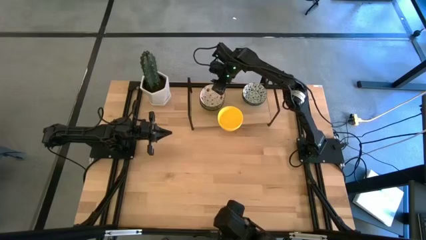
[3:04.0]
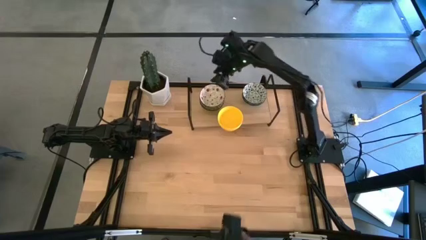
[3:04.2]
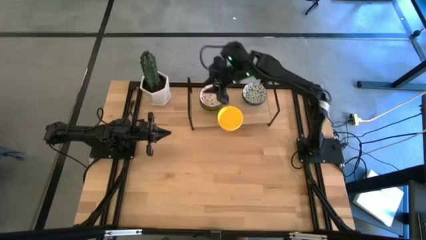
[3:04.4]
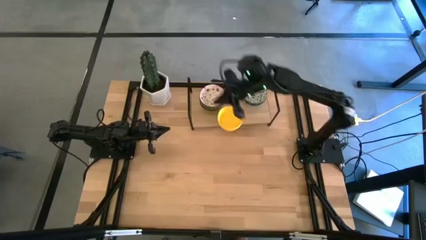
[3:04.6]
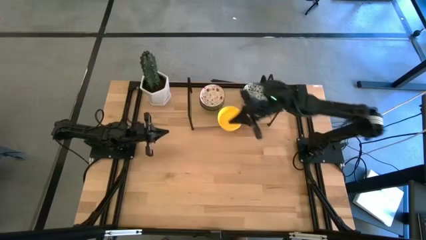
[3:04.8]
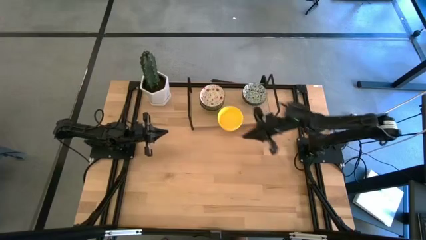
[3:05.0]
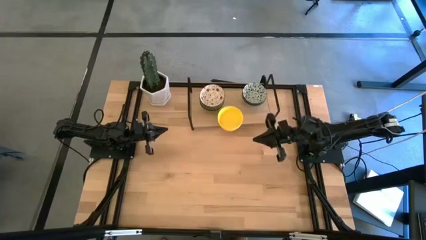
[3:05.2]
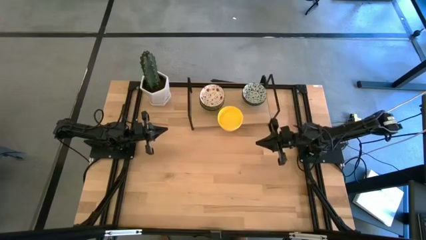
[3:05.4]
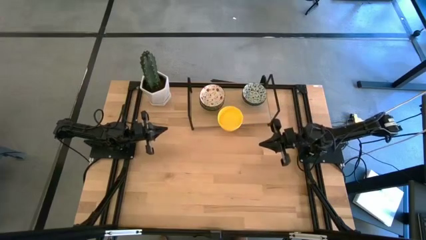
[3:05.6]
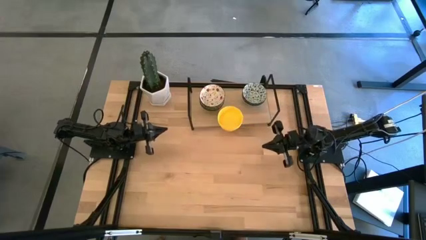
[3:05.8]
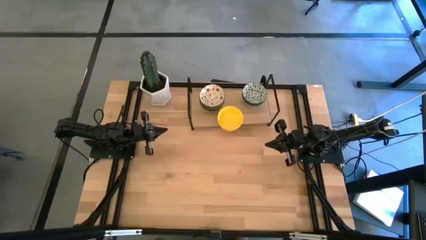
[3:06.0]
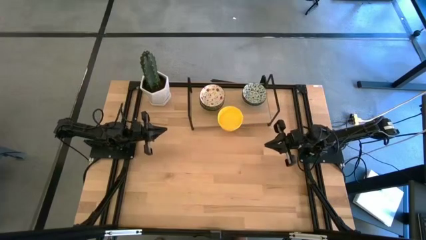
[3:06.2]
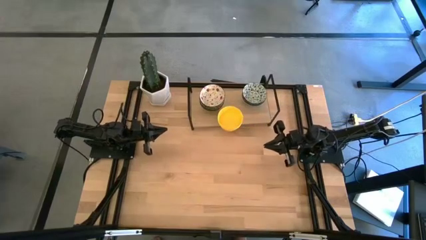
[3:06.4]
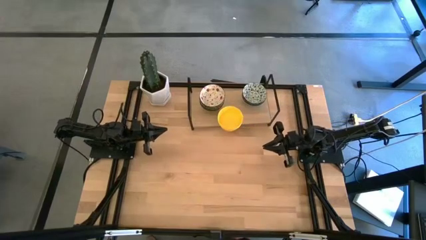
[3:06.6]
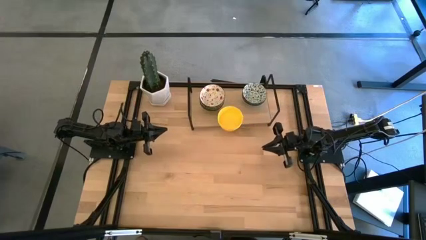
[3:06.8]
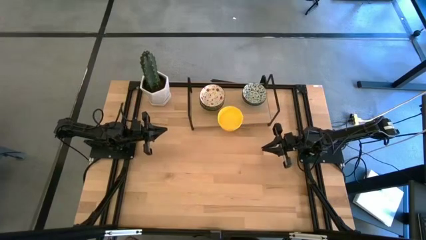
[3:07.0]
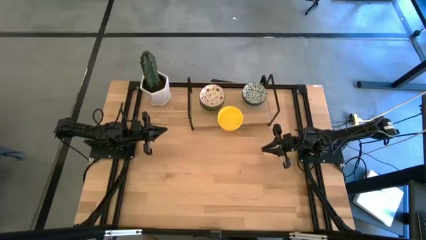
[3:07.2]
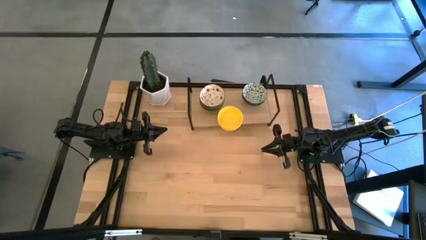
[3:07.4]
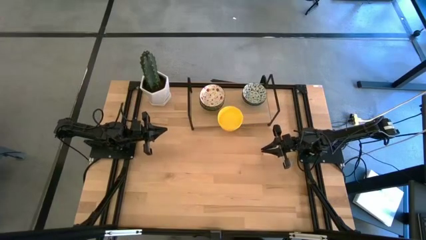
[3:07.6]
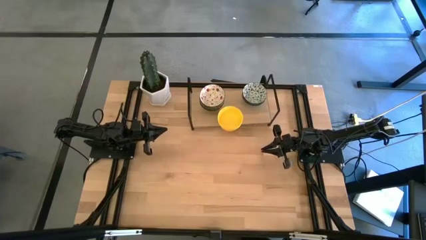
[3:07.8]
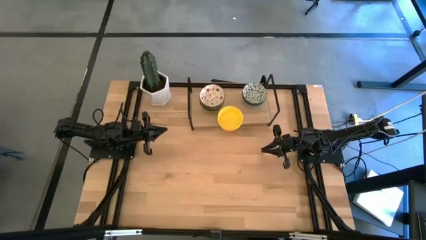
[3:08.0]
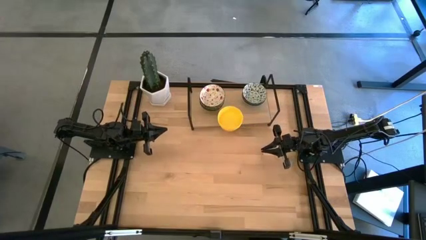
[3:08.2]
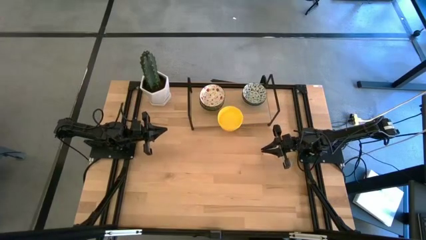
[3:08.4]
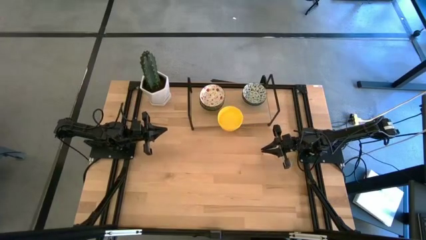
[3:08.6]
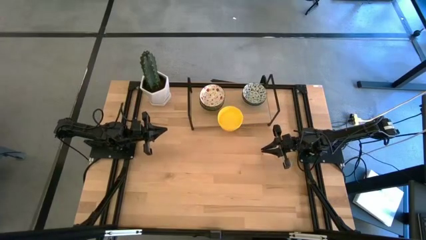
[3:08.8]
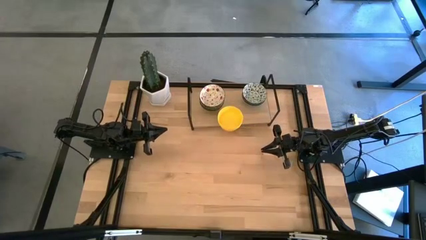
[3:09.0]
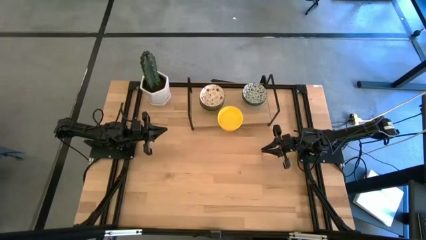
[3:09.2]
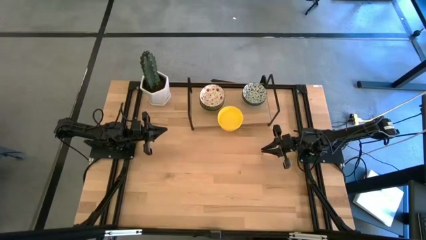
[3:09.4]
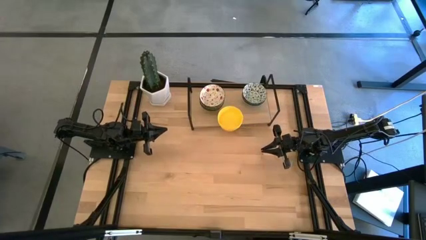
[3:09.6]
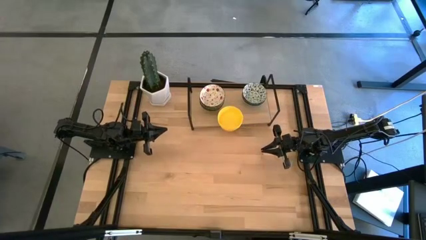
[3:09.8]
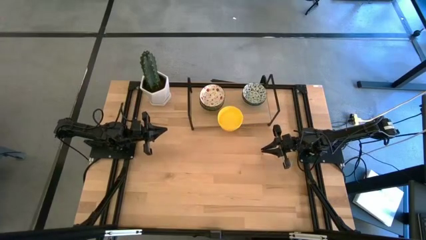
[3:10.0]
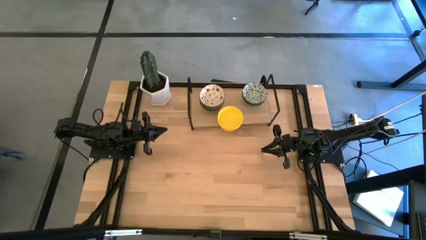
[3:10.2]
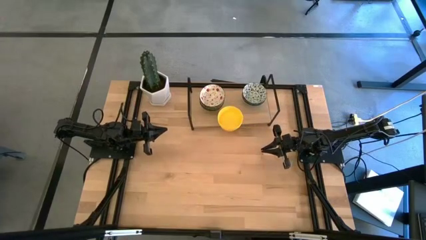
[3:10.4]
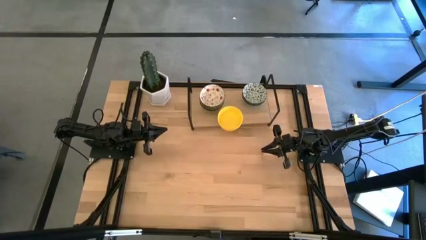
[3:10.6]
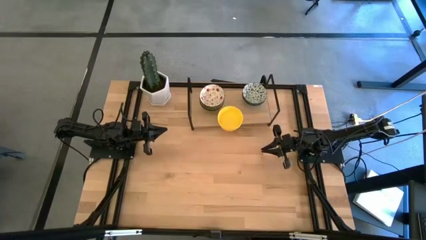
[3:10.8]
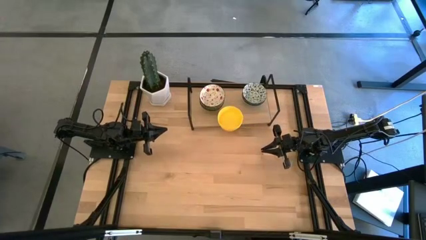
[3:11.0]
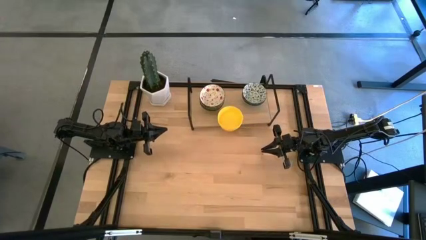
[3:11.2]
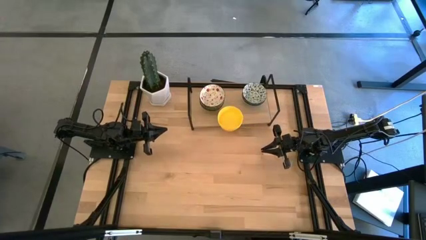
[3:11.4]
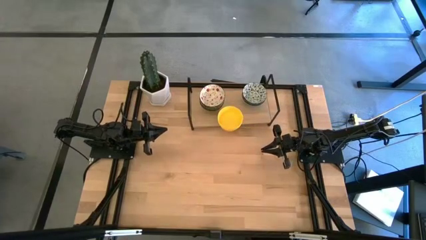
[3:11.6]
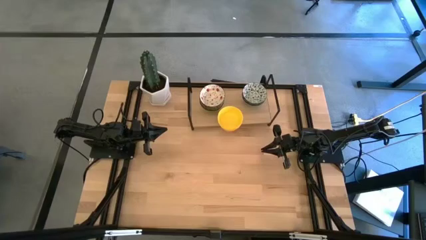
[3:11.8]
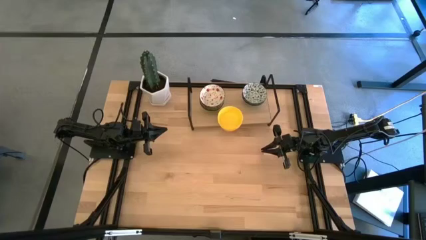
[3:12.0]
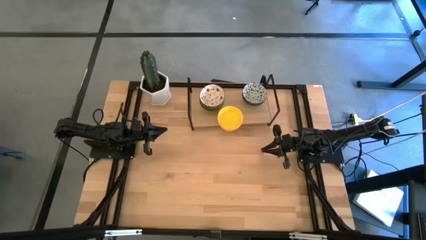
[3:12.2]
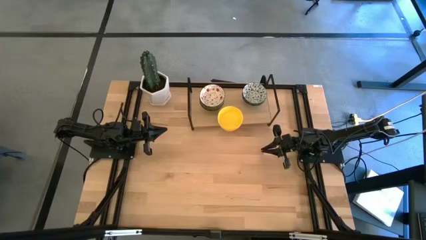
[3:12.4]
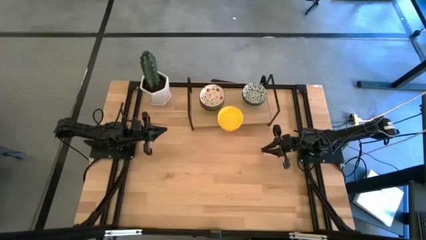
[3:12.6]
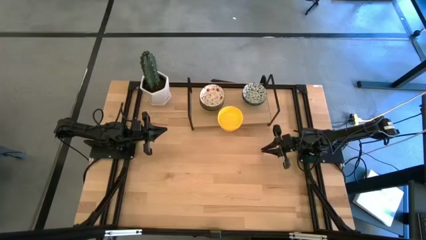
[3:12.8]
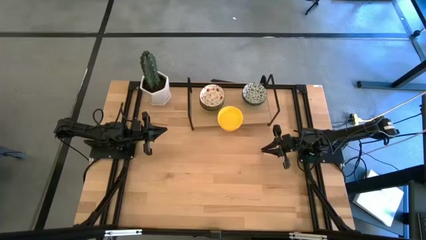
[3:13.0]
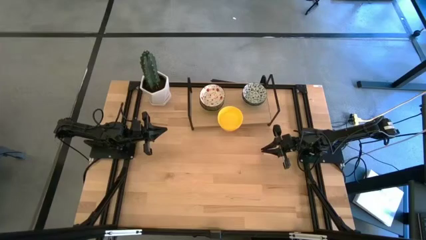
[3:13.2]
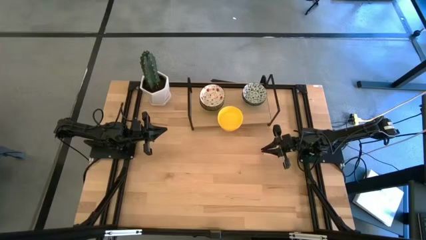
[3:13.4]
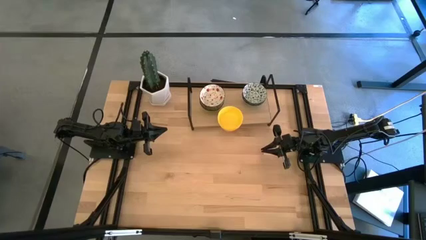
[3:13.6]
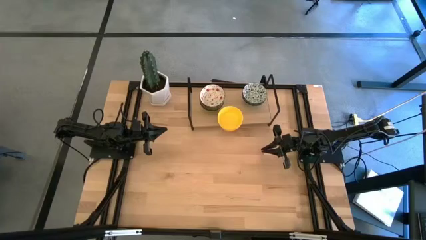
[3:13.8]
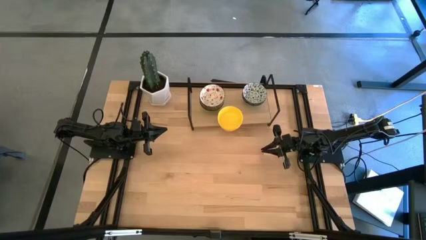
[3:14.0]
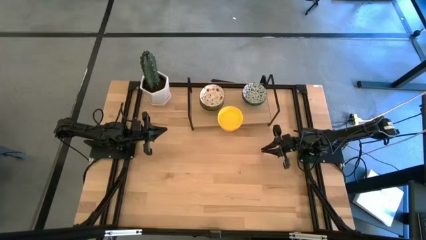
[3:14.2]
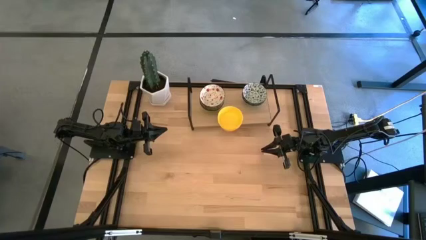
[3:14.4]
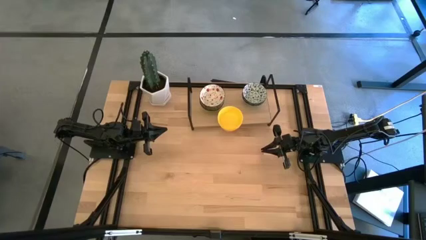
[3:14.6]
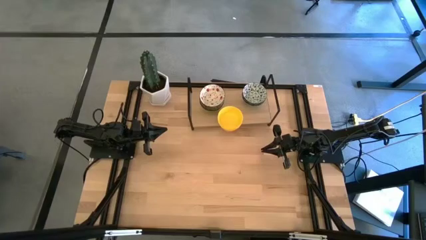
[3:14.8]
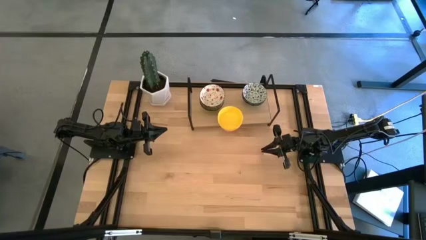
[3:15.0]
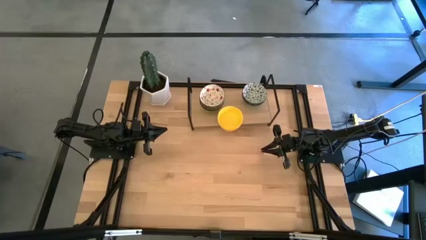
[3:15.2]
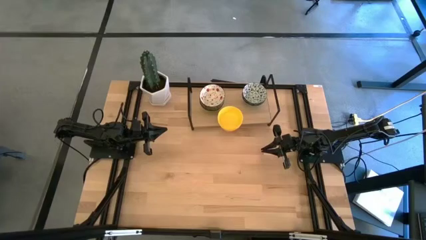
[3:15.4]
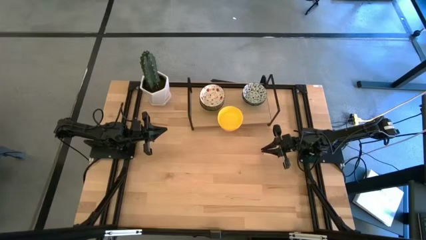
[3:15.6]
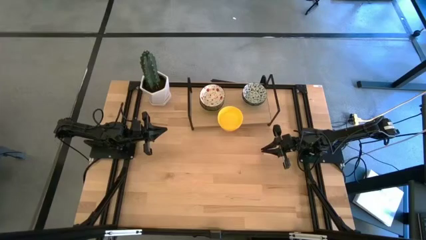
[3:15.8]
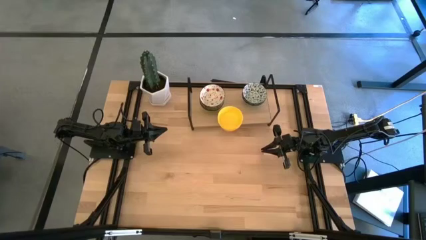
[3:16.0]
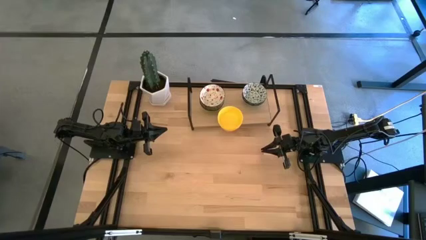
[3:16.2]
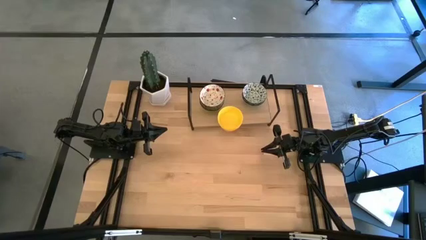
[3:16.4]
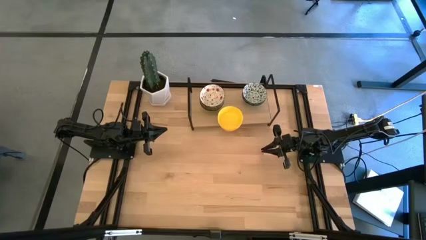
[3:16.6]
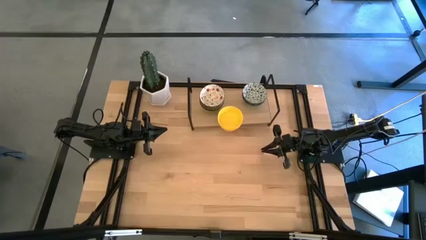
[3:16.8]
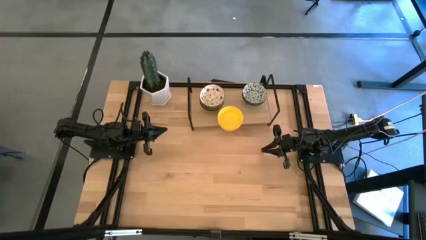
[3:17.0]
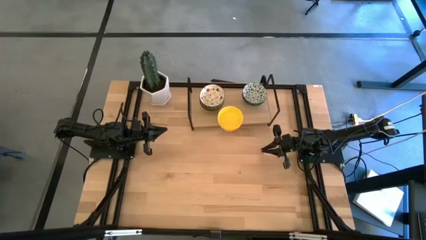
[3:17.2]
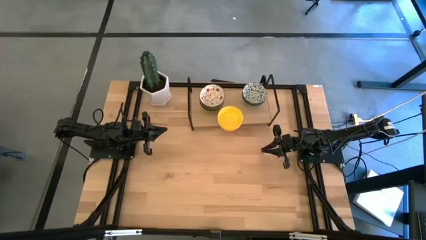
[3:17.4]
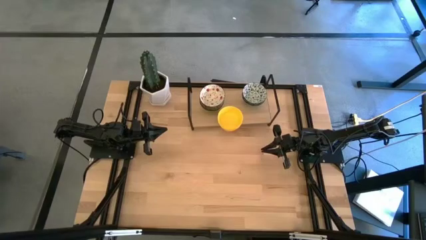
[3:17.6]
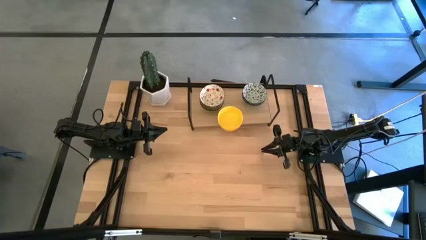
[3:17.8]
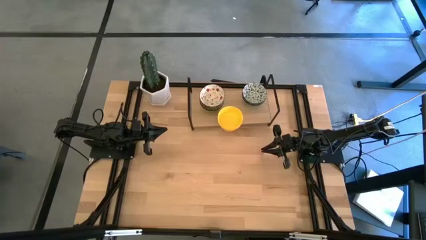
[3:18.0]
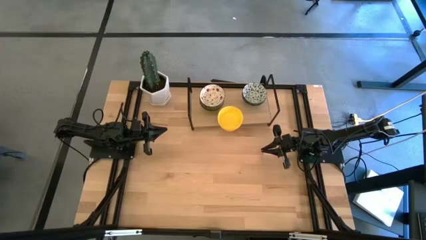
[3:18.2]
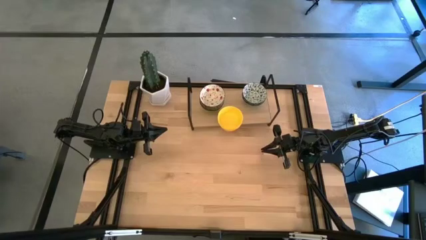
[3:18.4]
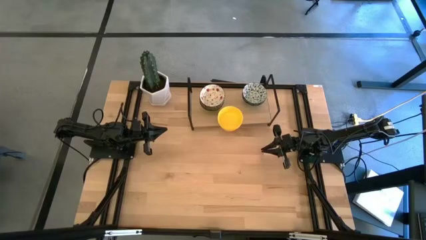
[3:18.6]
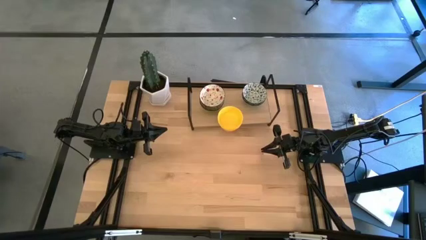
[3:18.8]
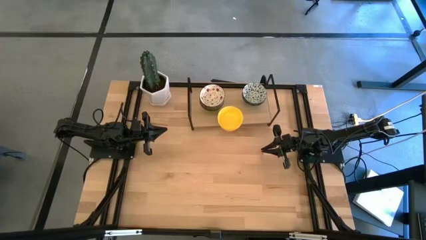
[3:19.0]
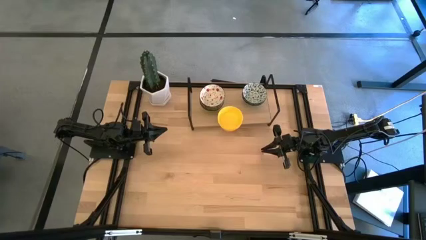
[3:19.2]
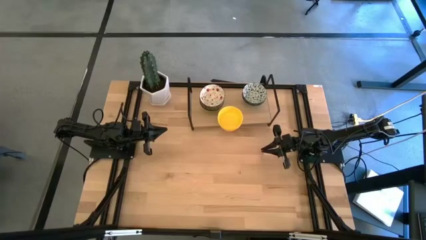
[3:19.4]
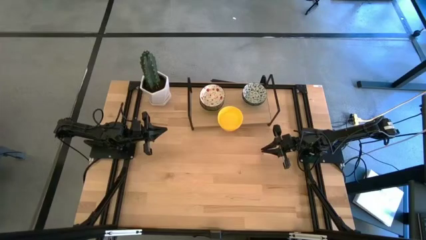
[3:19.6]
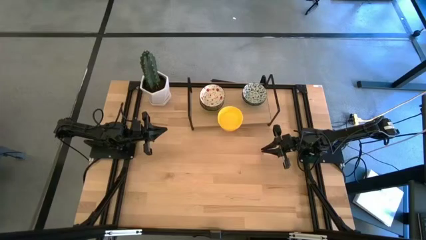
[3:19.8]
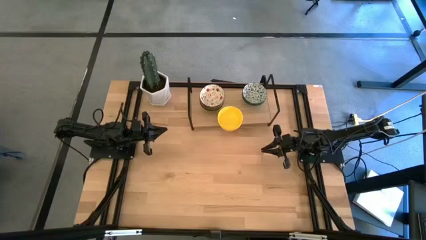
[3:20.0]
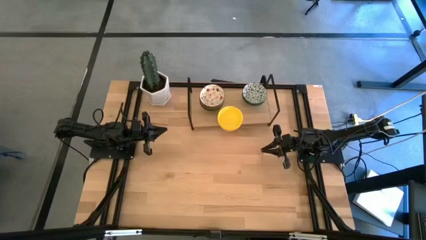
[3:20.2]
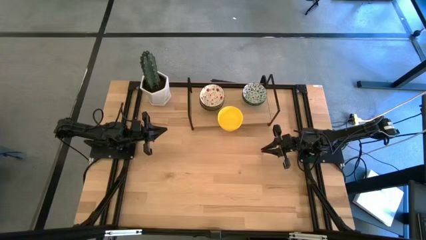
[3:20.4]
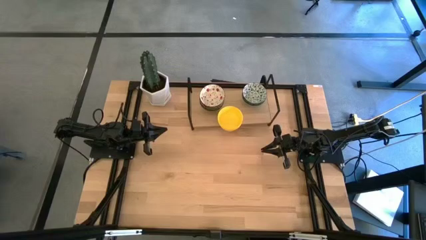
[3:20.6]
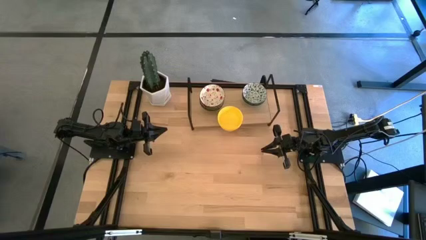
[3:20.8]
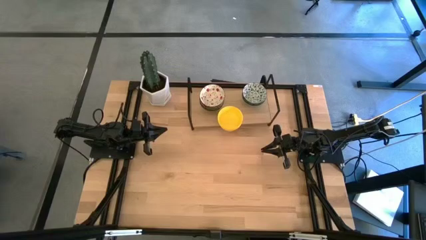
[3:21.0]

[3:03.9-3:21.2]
Task: Pick & Place Mini bowls
Return to Home Position
